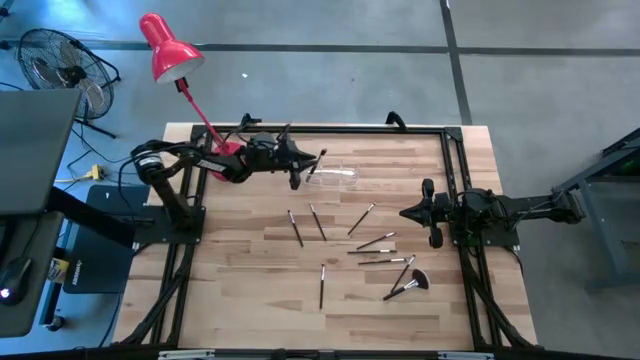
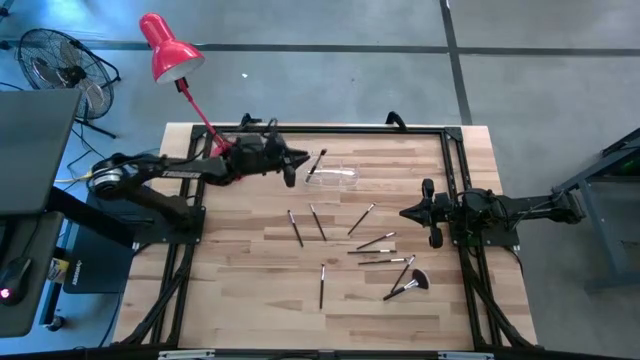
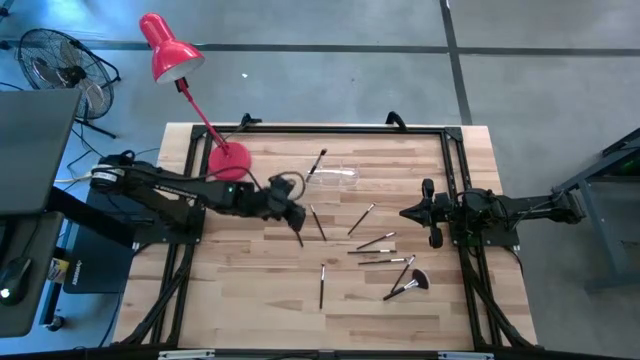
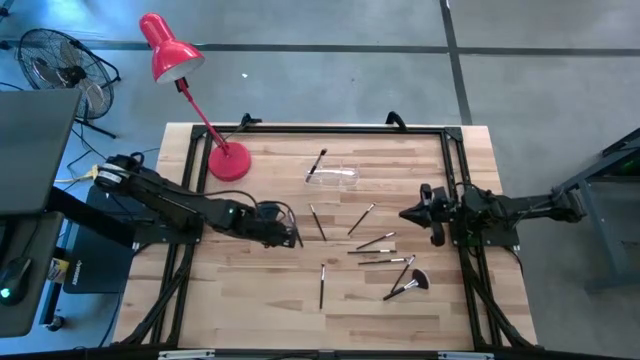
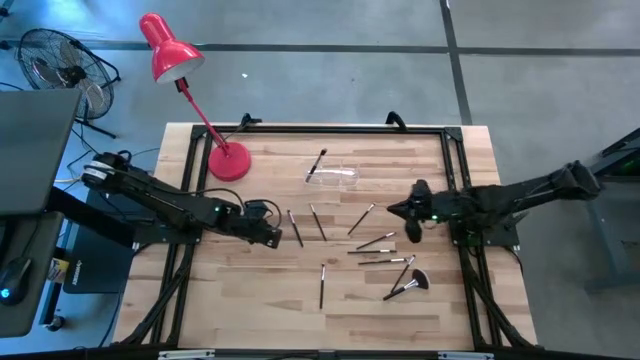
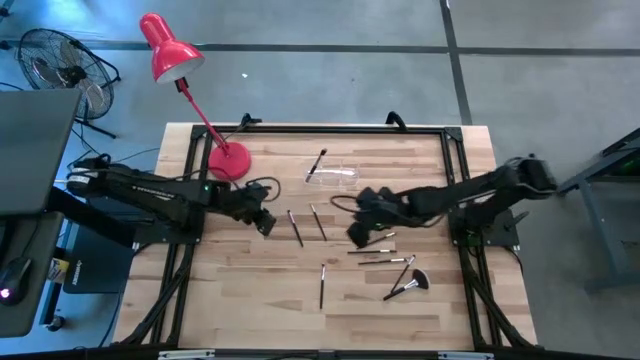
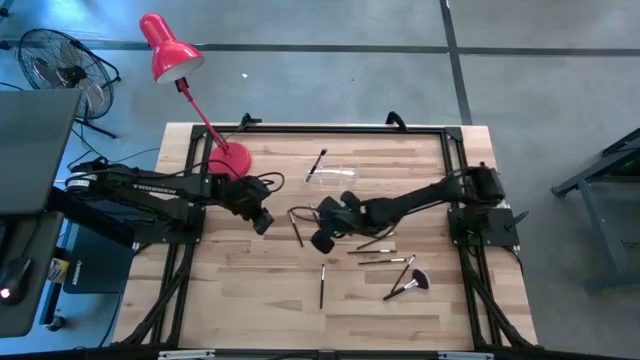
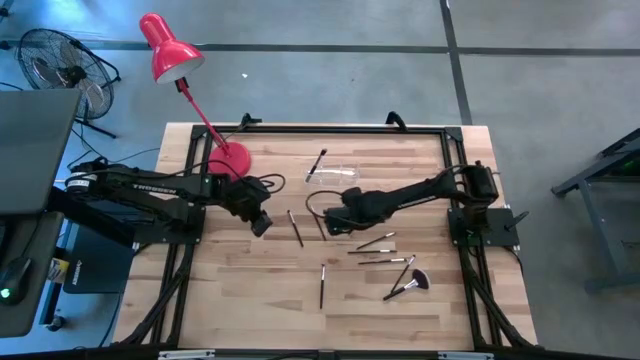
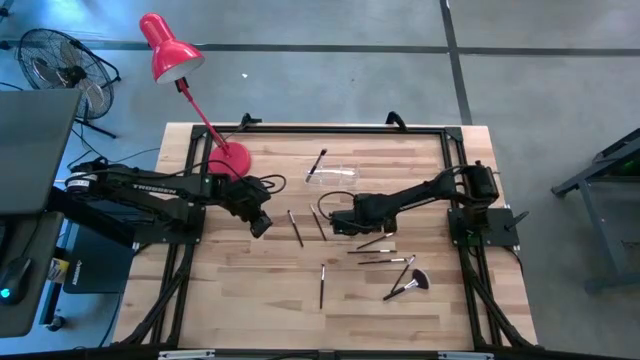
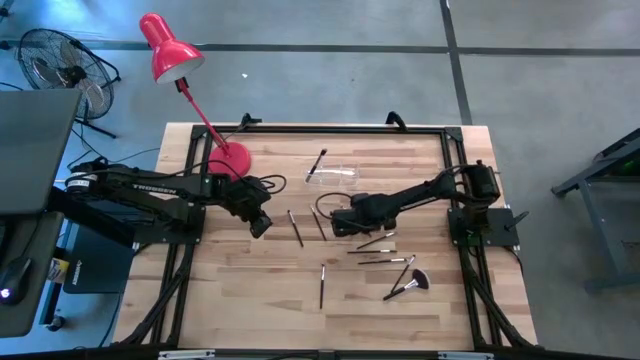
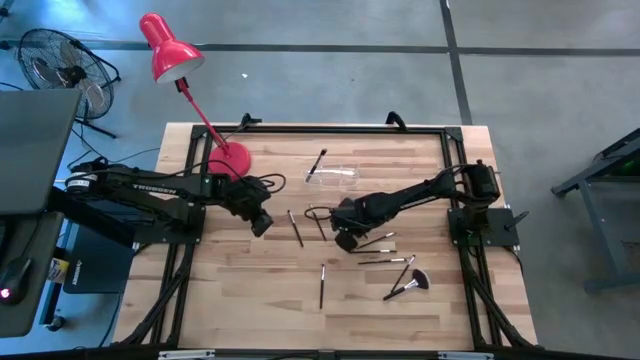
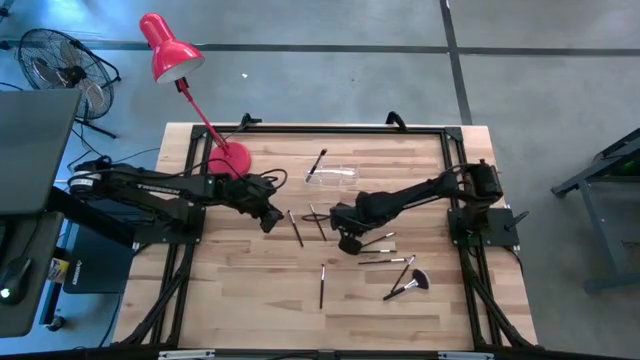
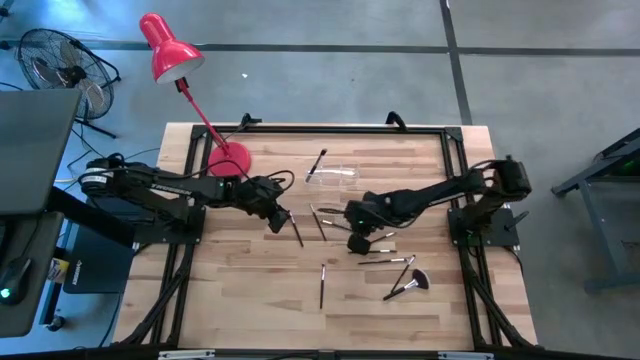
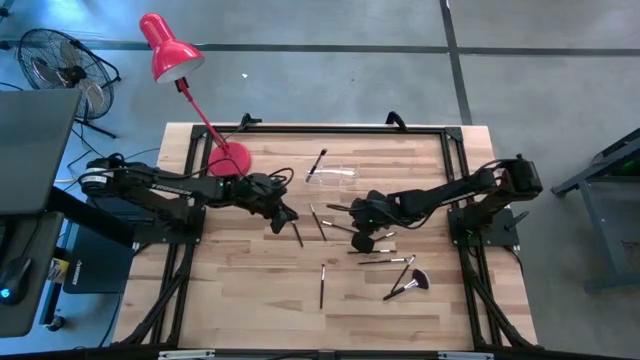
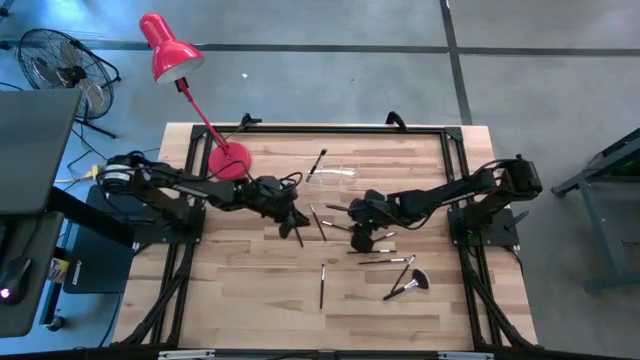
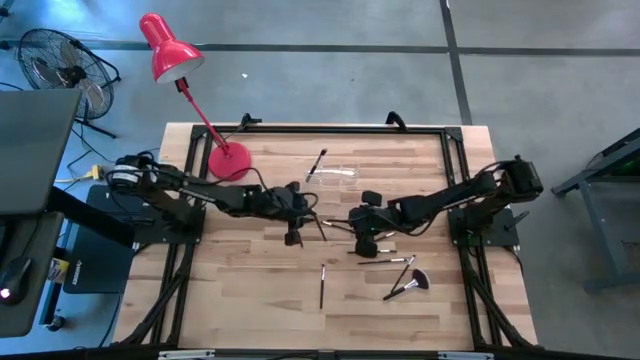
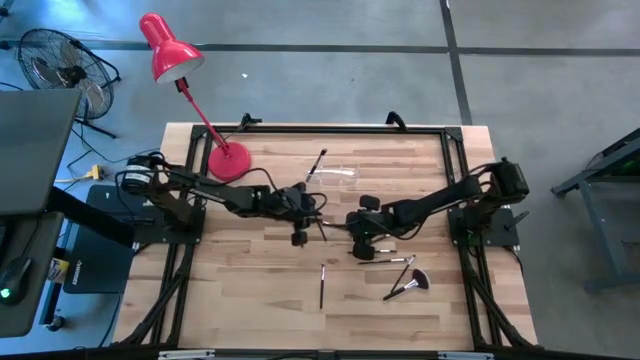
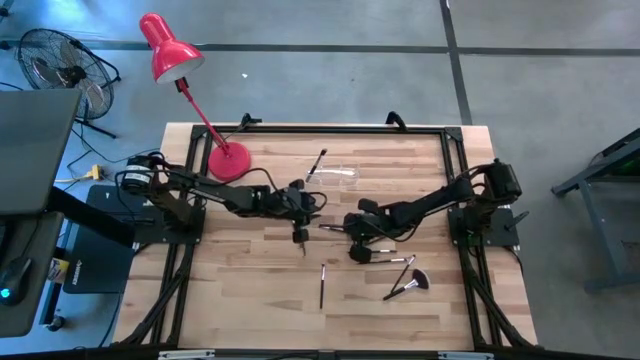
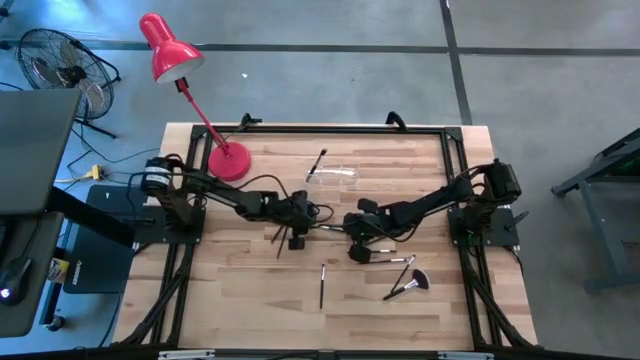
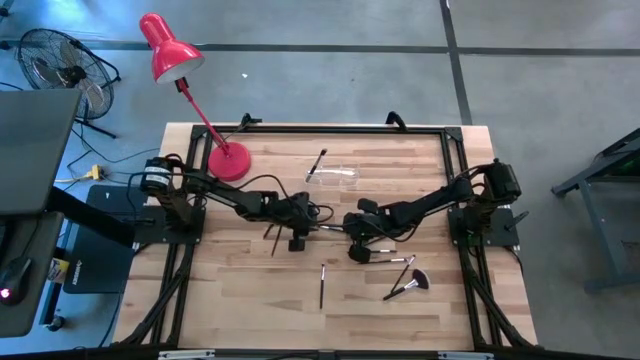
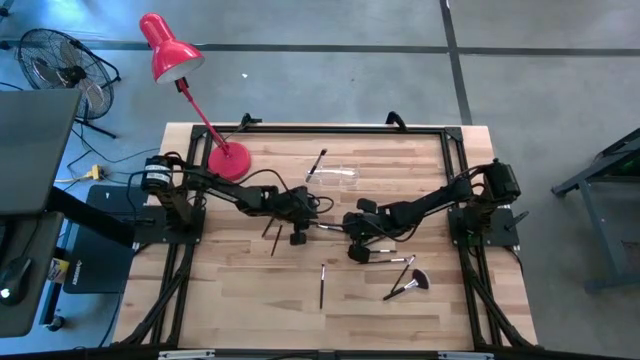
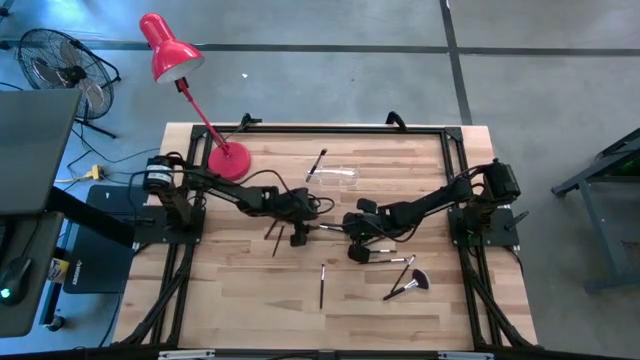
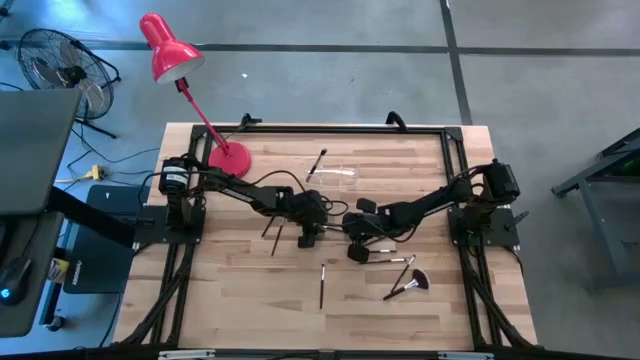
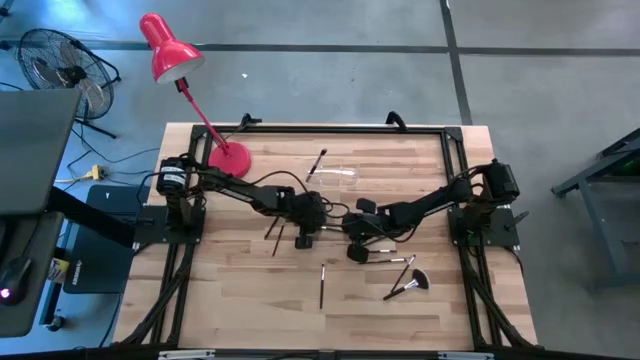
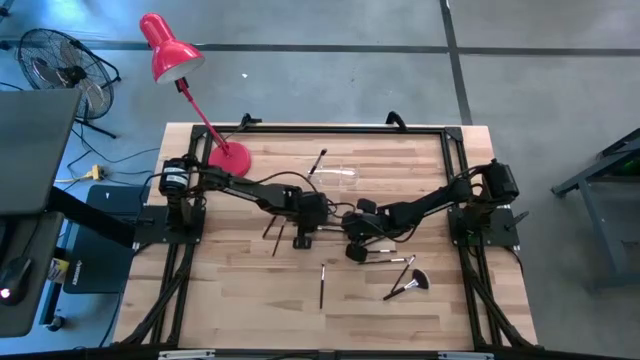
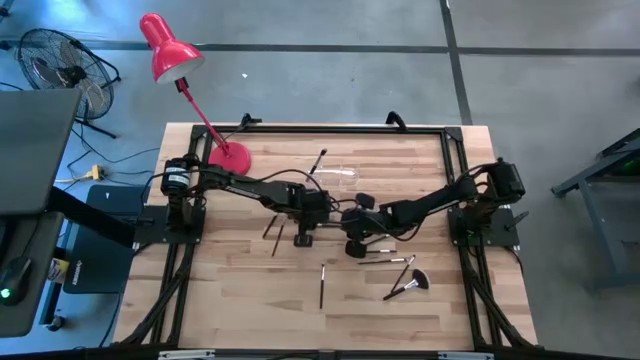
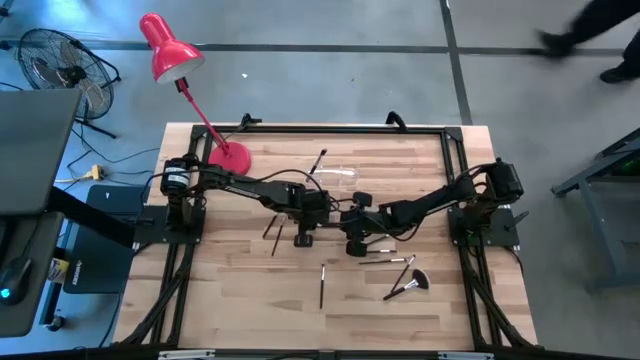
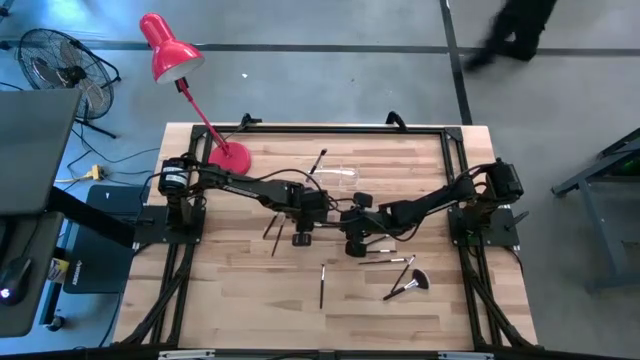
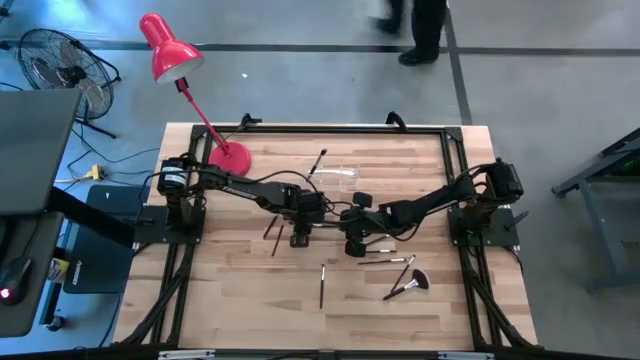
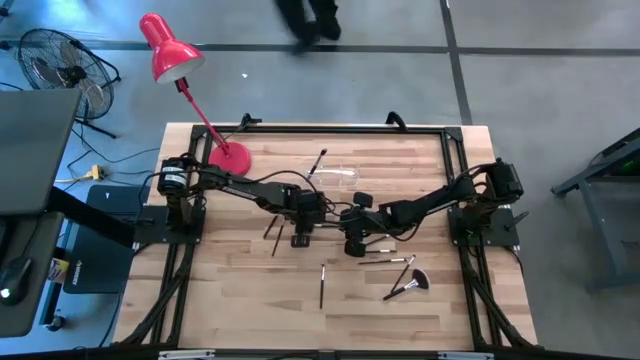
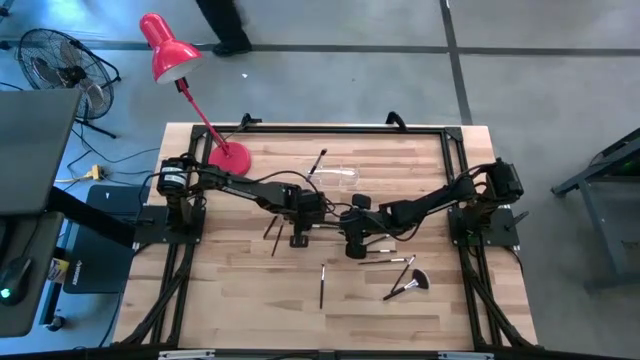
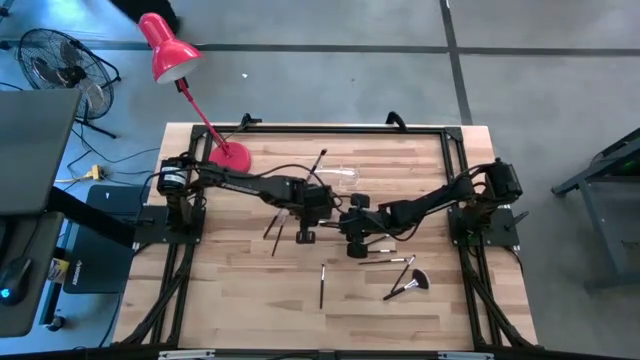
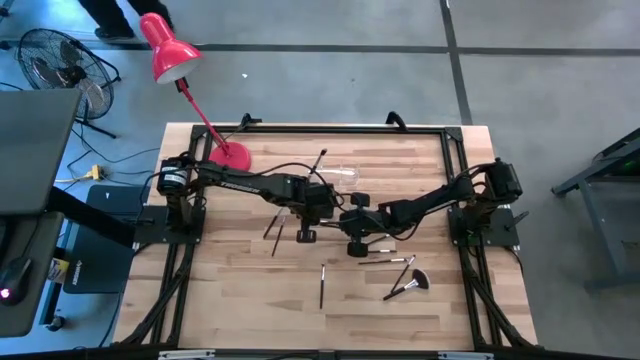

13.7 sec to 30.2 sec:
Task: Put items in baskets/containers
Put the eyeshadow brush into the transparent organizer

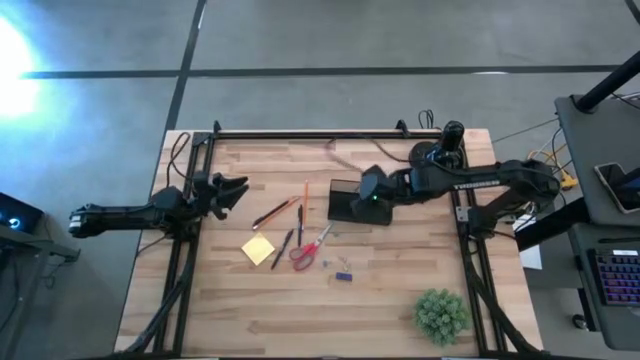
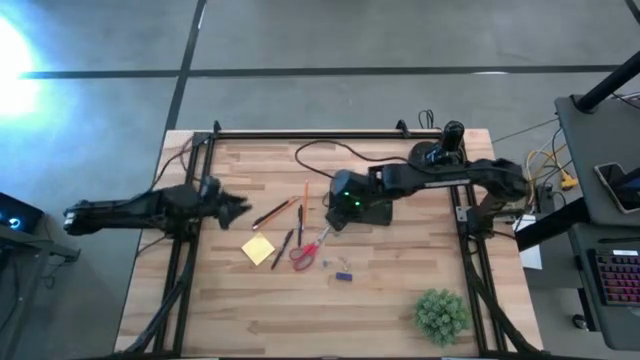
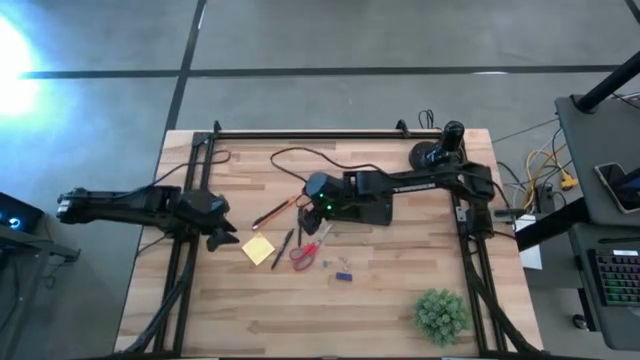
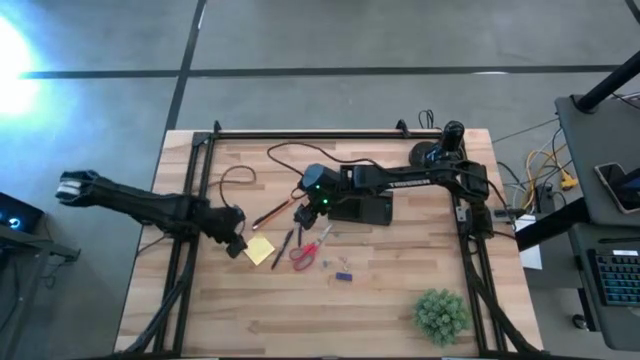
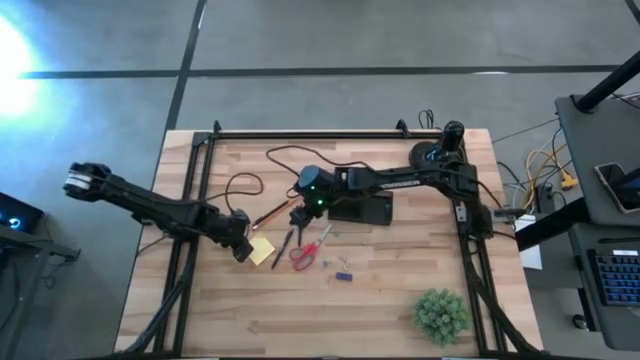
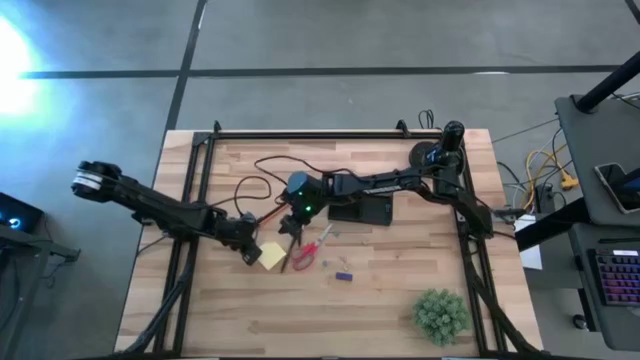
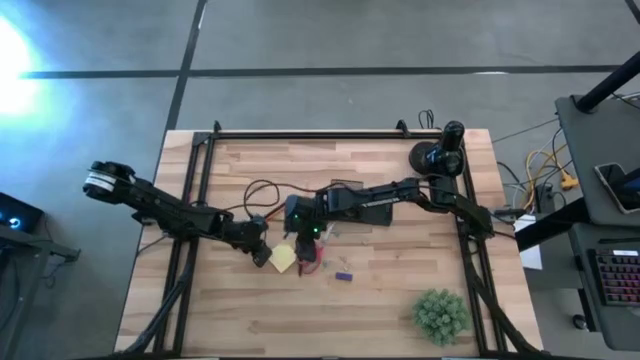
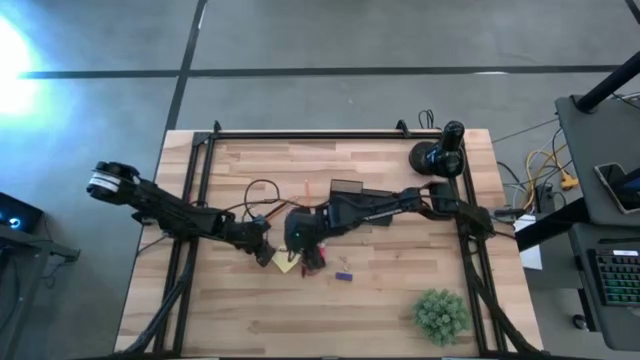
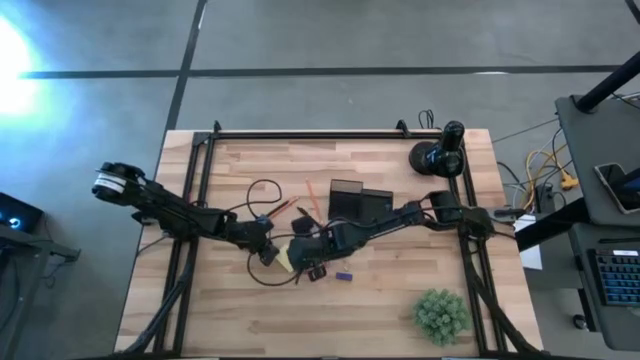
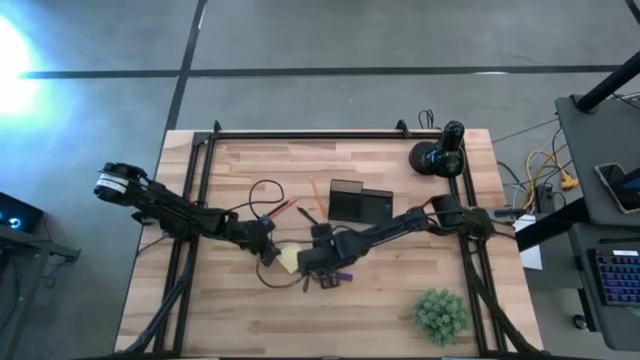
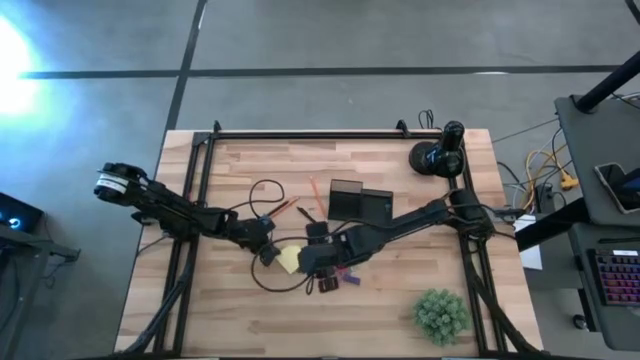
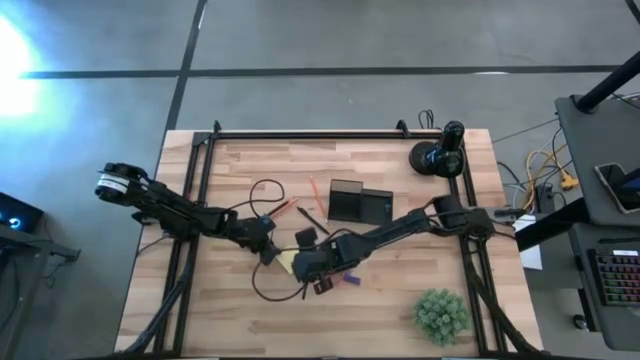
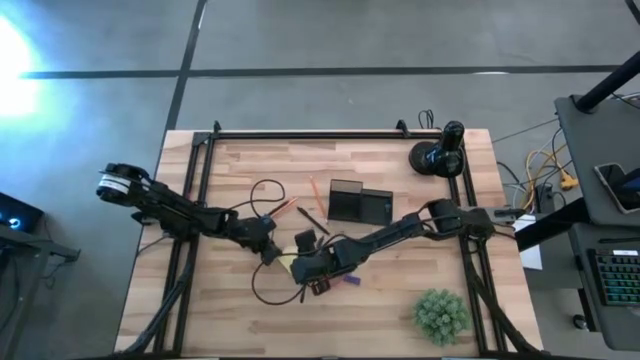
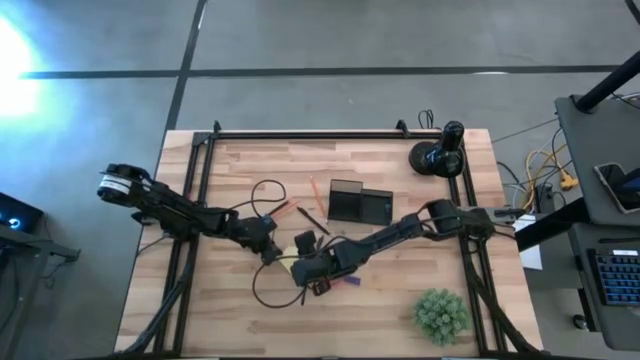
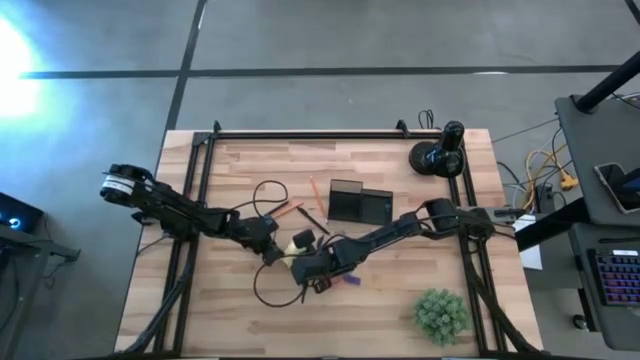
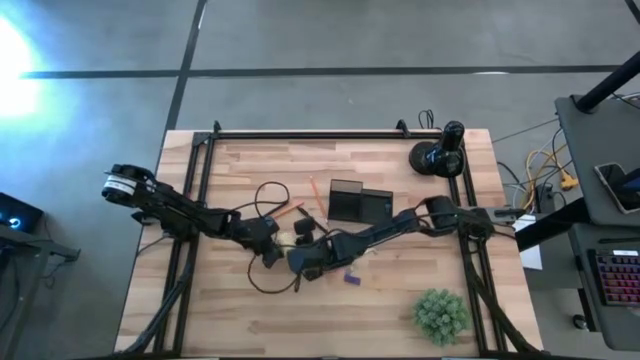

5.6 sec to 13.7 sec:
Task: Pick and place office supplies into organizer
Move the sticky note to the middle right of the table
